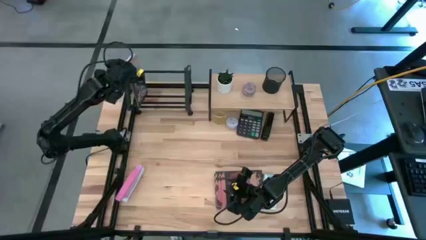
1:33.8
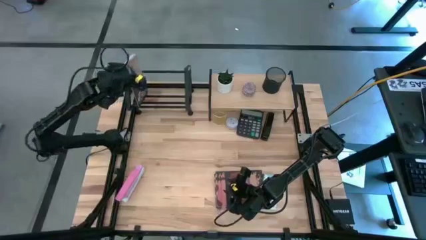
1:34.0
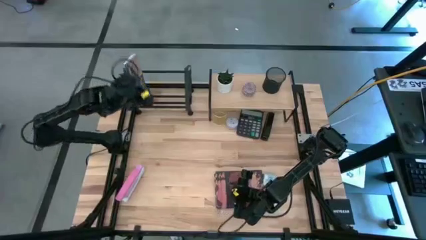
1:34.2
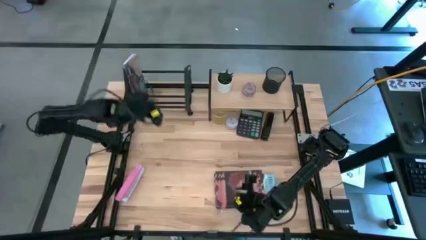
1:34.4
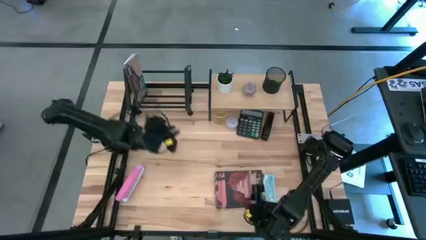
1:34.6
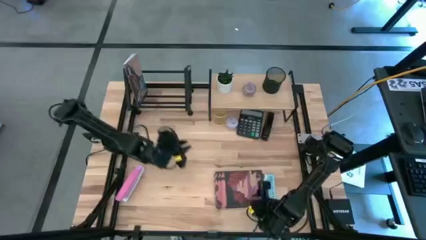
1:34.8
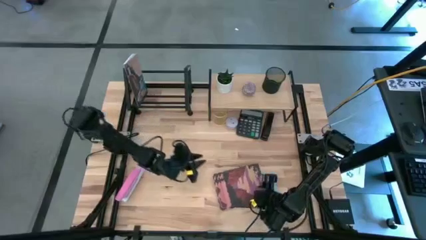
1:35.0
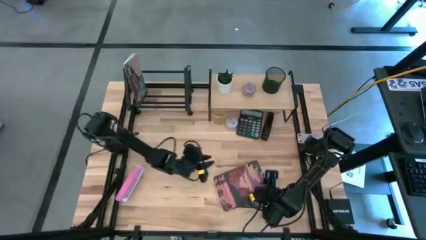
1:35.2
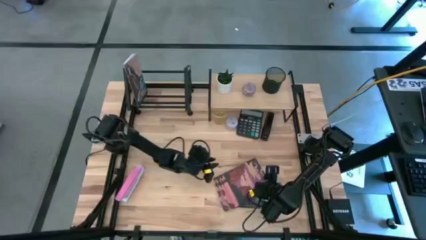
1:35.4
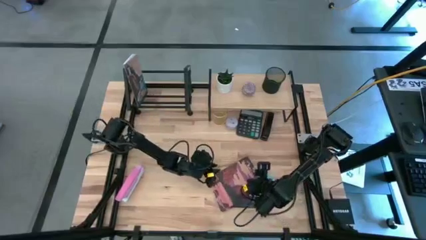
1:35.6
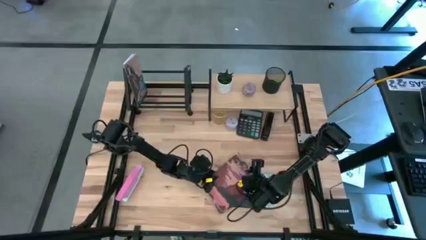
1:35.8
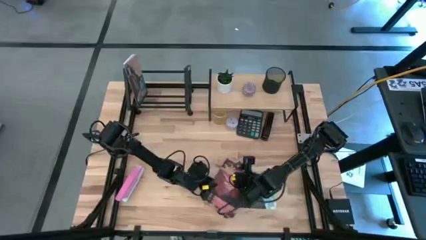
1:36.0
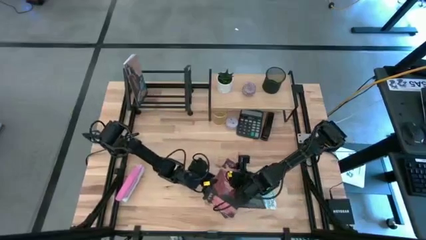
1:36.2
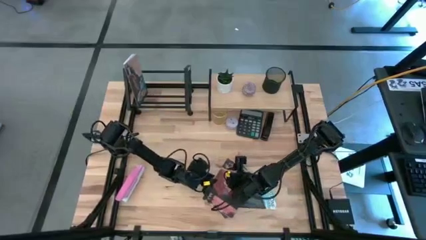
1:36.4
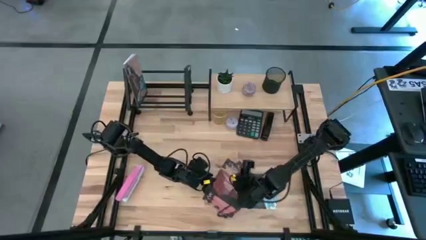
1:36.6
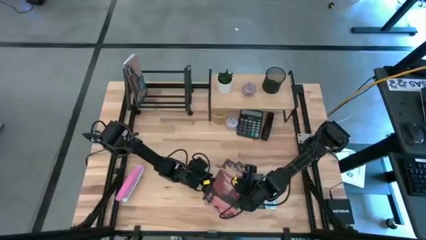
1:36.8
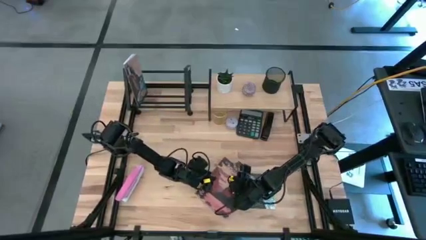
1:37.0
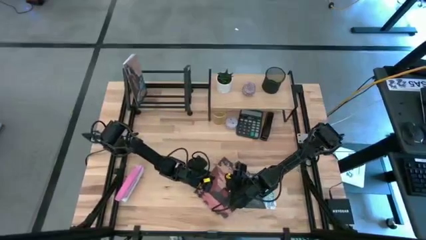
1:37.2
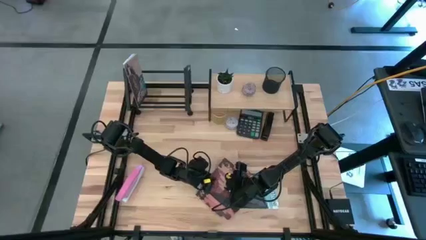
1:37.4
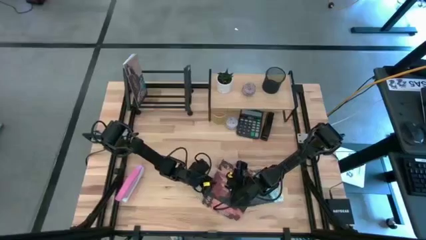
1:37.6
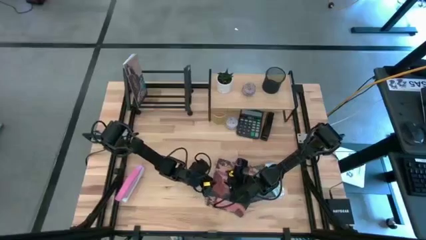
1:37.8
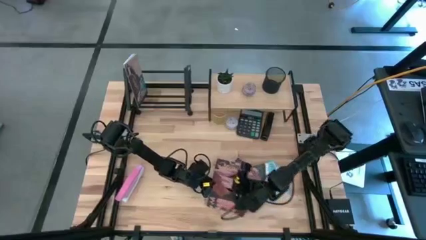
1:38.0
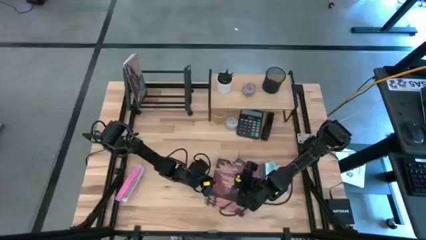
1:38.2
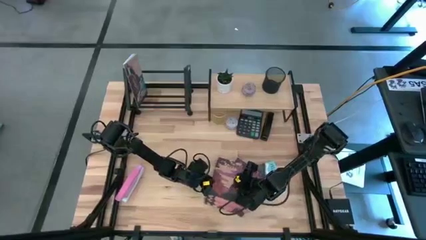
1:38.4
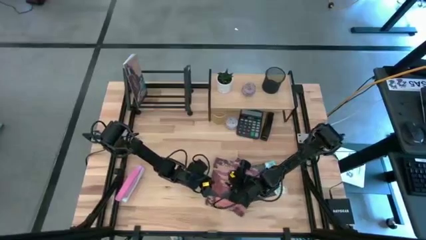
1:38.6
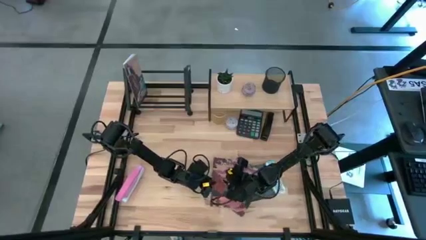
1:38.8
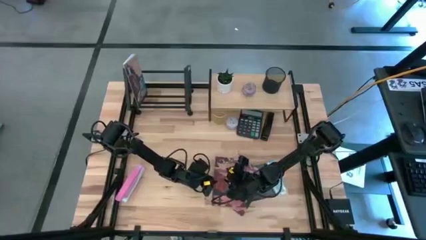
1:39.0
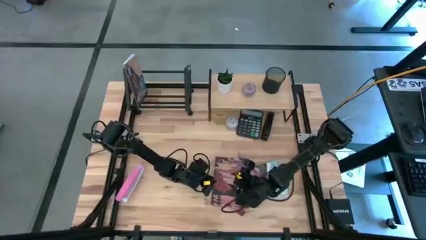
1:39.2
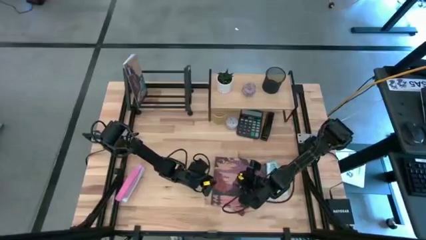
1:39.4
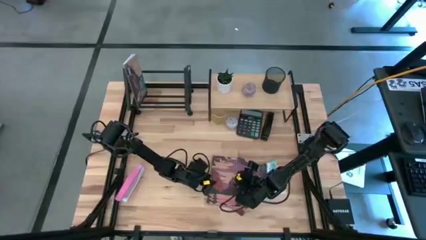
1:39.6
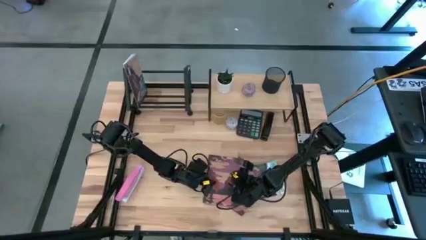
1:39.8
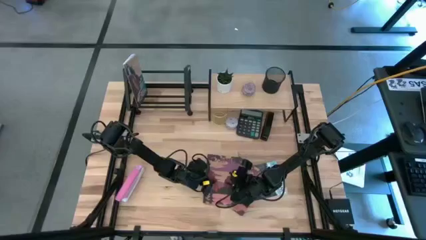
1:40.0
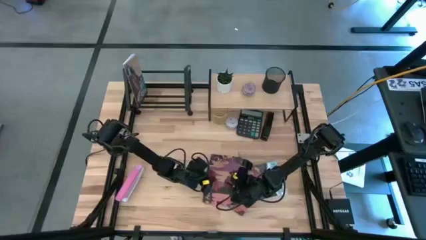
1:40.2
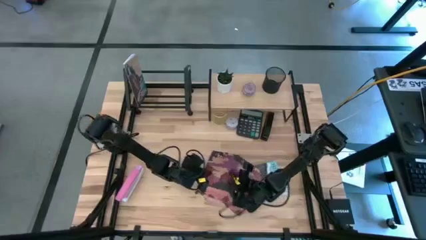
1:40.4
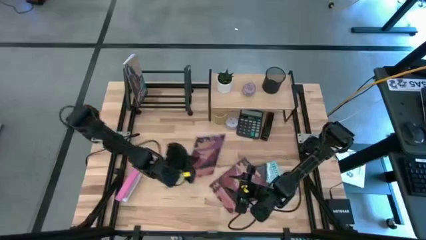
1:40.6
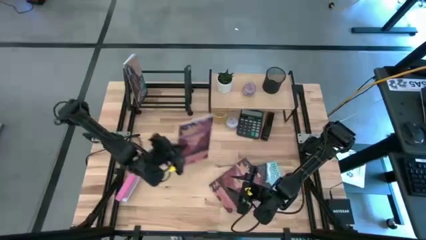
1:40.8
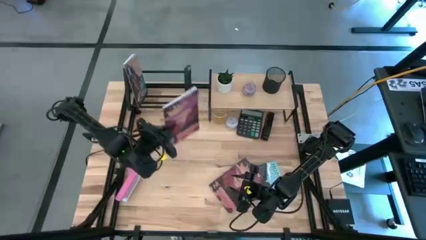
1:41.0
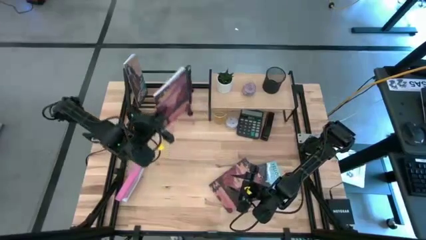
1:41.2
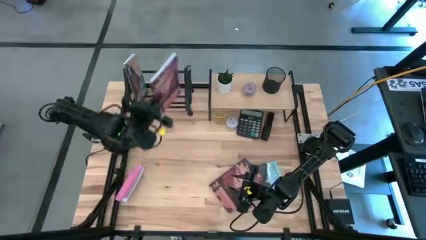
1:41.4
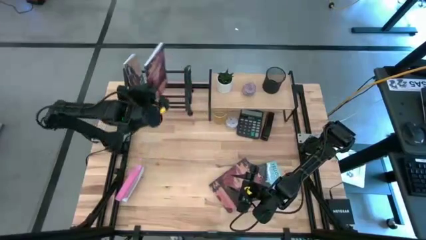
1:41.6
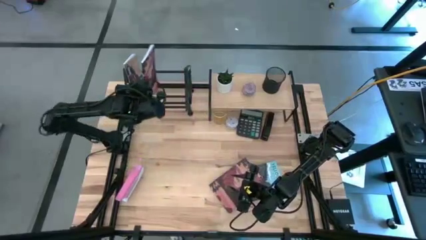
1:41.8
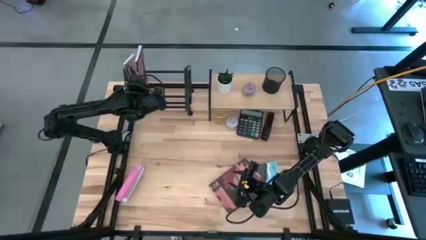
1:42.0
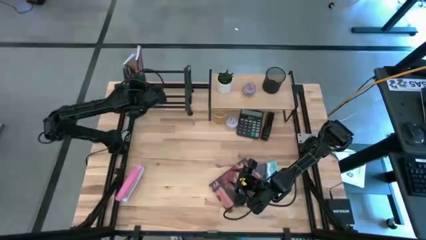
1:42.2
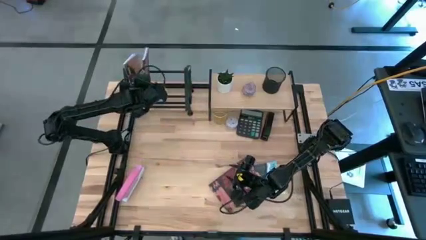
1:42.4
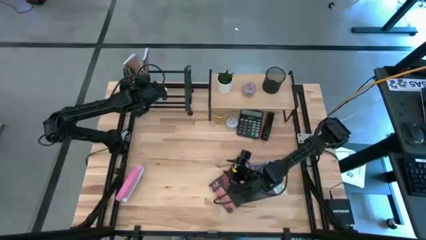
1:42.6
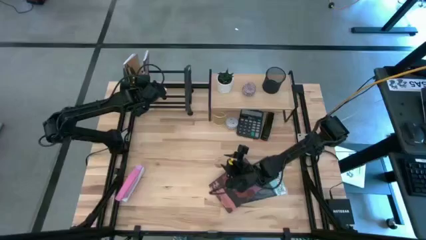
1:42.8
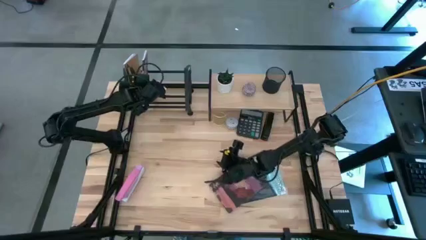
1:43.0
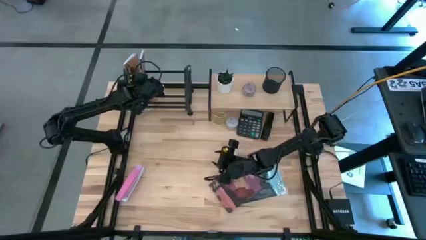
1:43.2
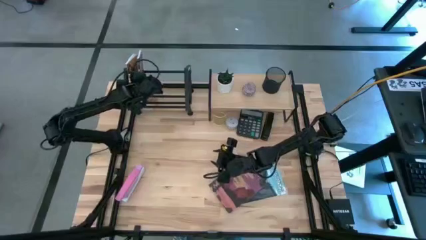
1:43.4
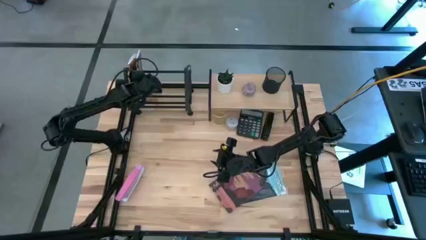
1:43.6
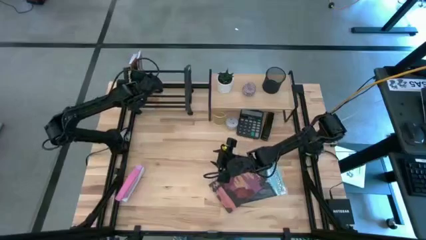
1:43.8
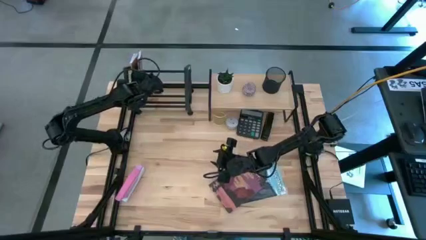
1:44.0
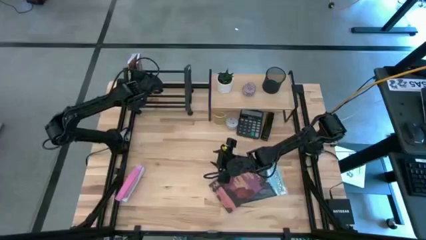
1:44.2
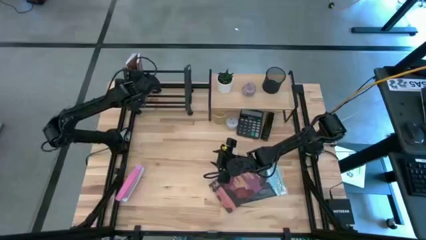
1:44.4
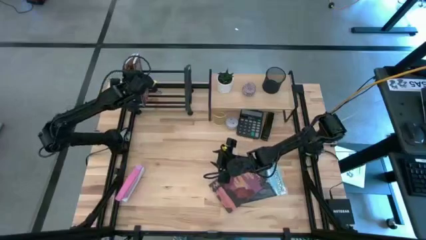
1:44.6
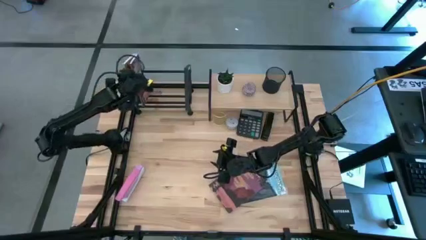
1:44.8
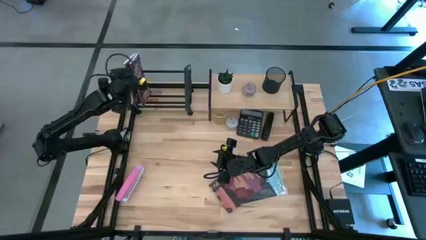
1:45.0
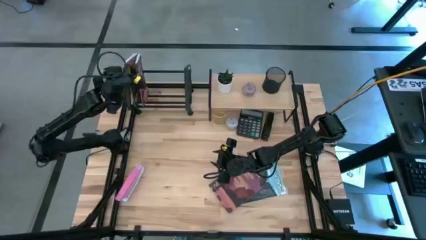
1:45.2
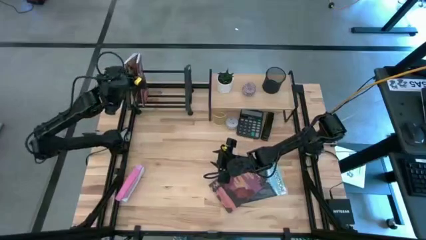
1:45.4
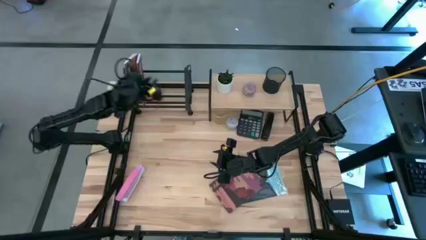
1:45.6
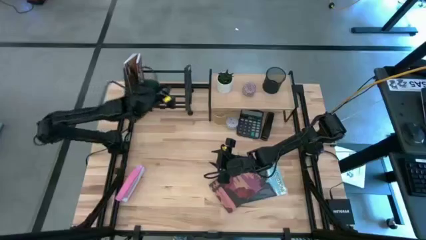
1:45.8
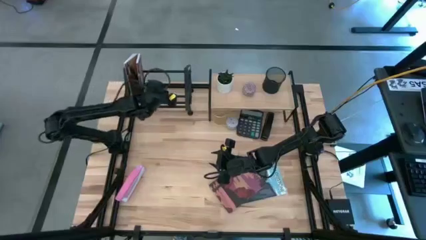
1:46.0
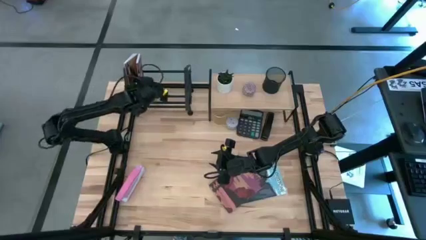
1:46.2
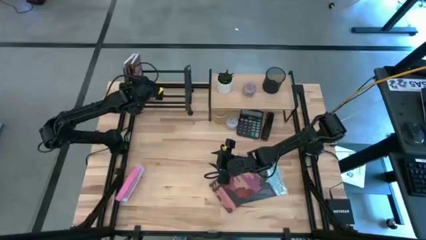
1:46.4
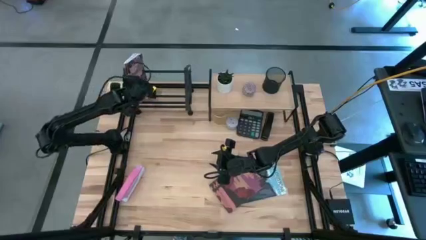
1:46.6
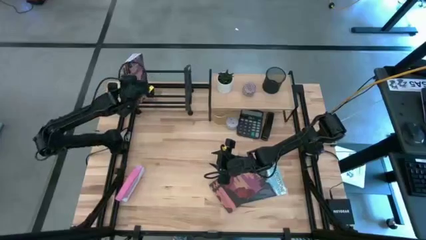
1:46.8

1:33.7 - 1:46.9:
Task: Stock shelves
Put the purple book into the book holder

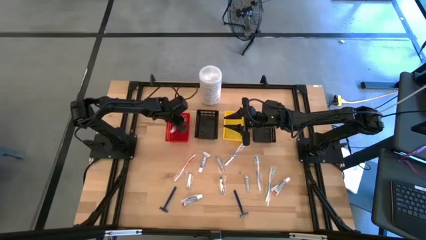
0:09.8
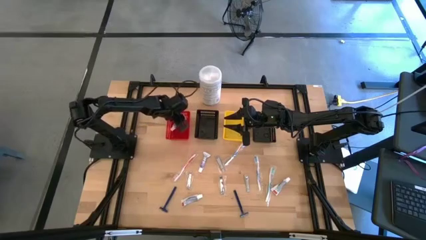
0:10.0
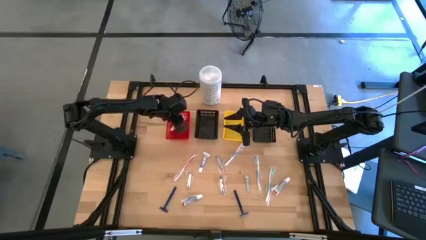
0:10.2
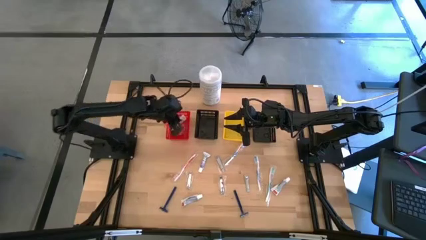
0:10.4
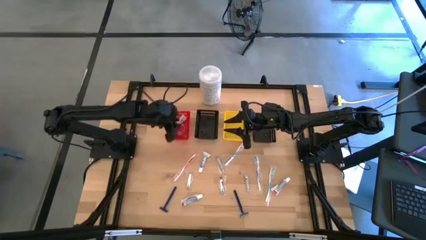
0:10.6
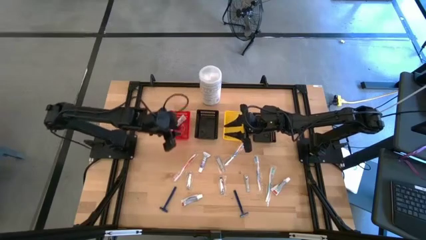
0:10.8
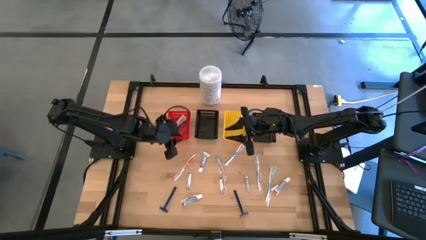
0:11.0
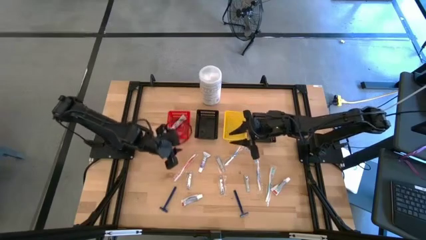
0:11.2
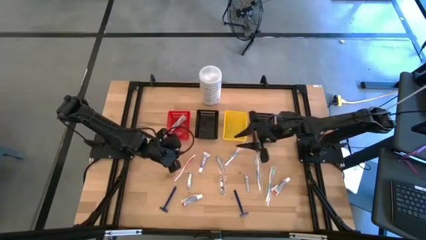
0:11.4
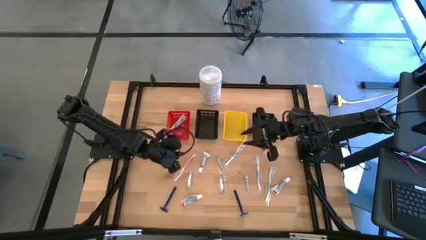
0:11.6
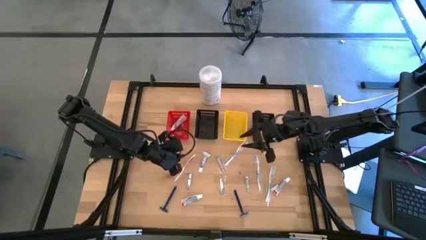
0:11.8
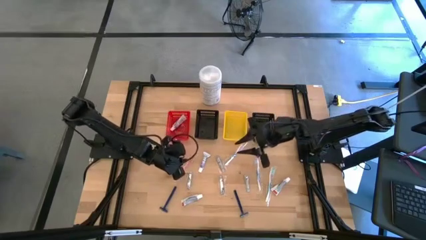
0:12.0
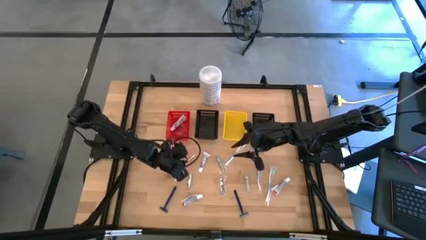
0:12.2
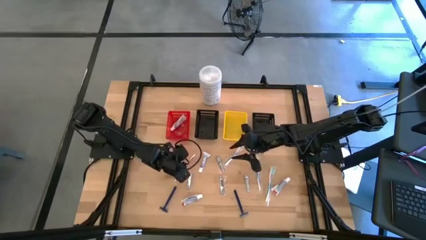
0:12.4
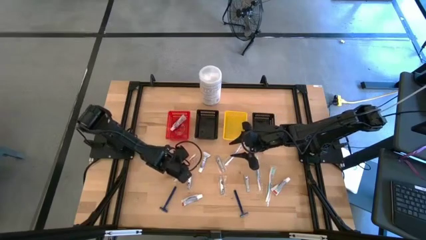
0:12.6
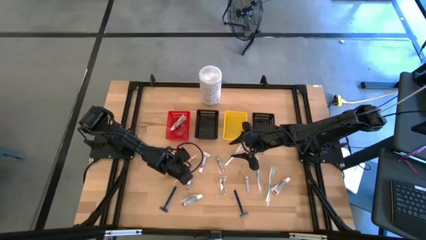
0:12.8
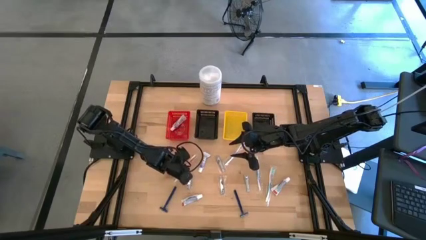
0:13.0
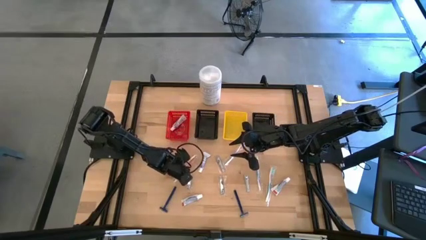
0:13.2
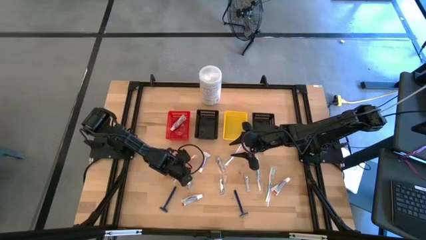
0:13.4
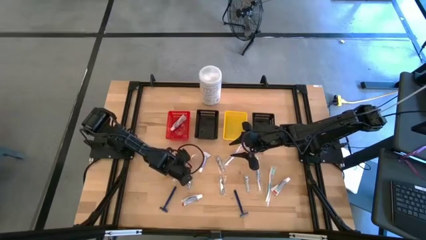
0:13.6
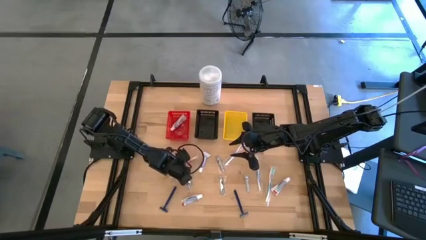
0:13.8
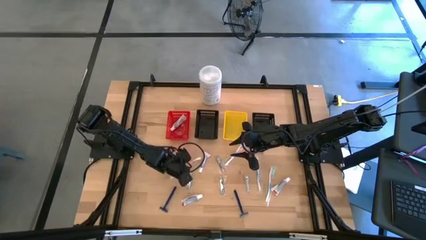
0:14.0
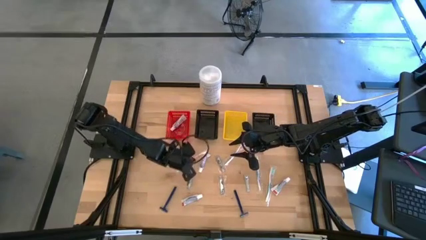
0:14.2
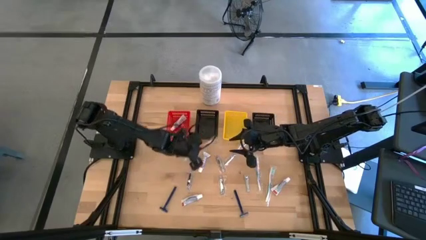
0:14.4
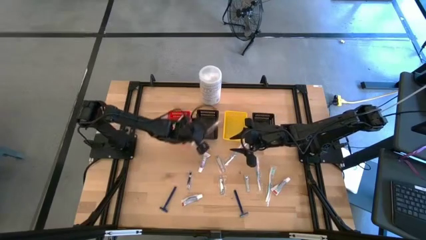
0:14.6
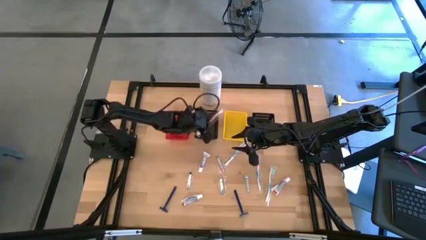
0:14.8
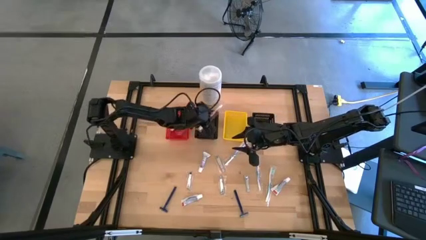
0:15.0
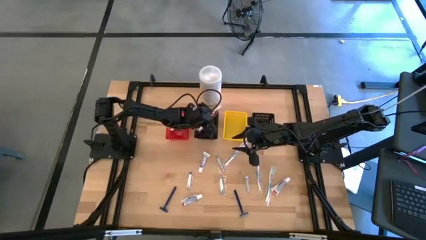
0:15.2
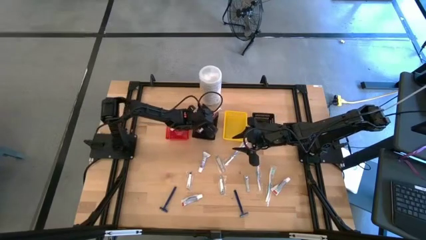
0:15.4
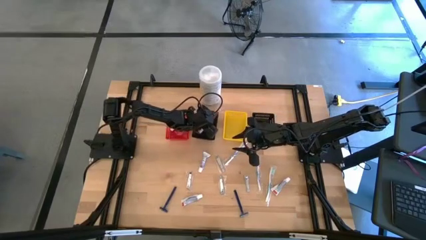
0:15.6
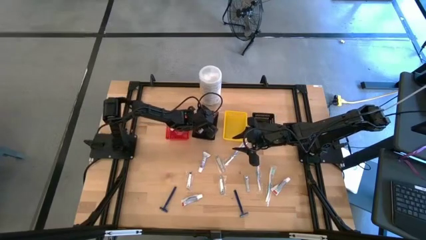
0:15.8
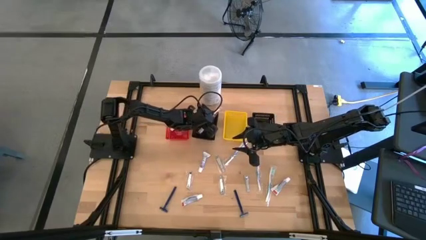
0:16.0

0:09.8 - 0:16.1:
Task: Pick & Place Travel size toiletries
Put the red toothbrush into the left black basket
